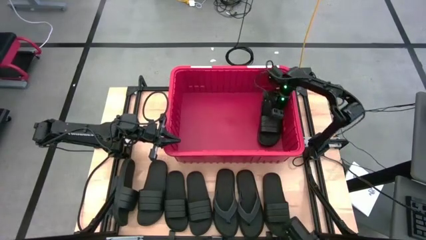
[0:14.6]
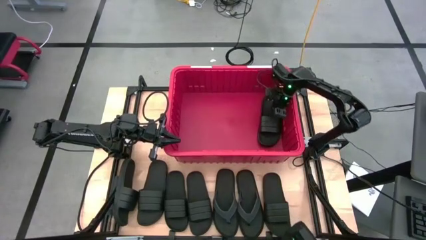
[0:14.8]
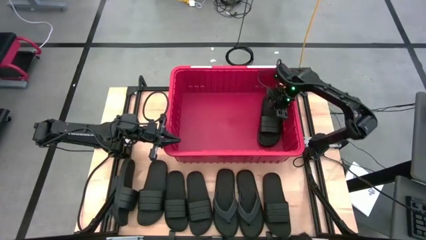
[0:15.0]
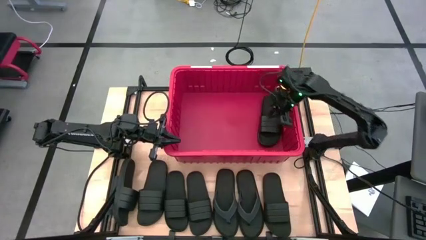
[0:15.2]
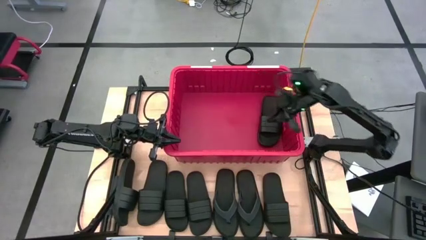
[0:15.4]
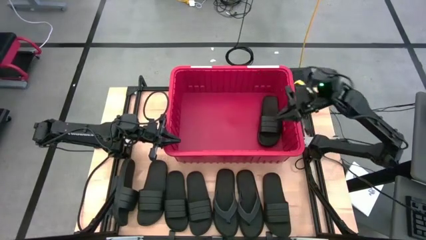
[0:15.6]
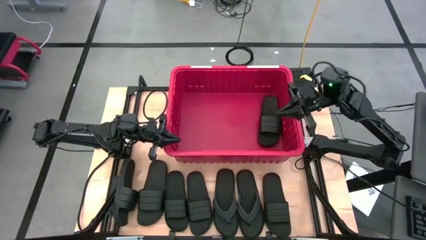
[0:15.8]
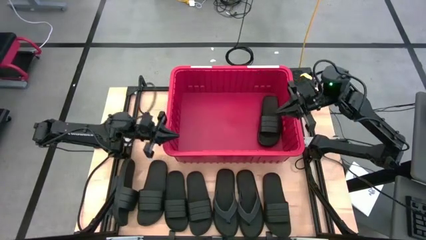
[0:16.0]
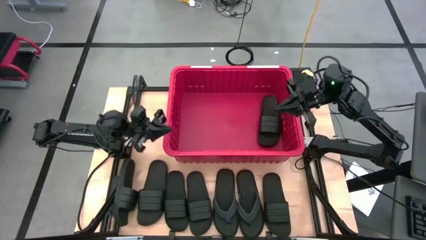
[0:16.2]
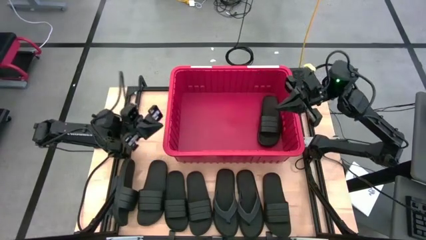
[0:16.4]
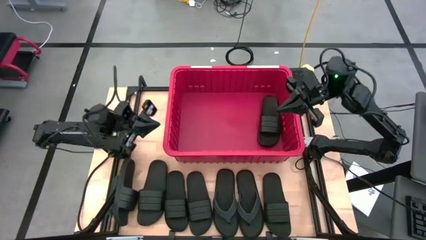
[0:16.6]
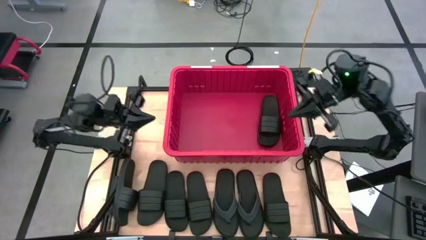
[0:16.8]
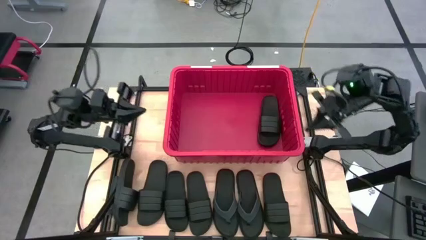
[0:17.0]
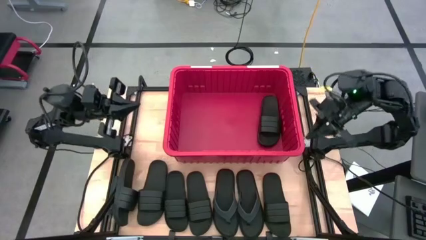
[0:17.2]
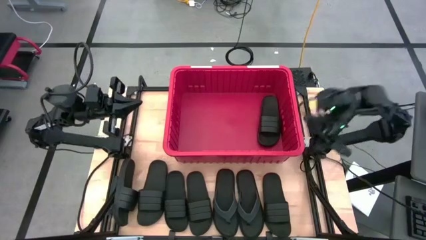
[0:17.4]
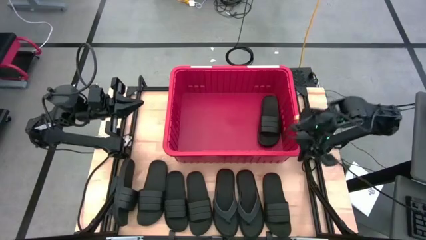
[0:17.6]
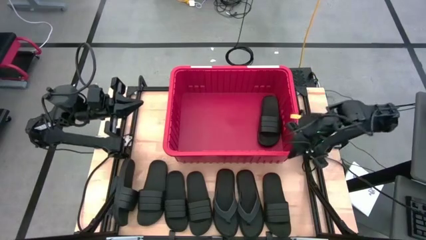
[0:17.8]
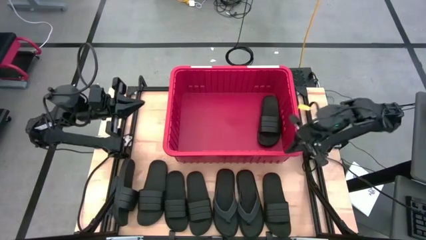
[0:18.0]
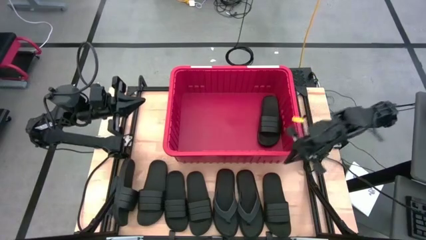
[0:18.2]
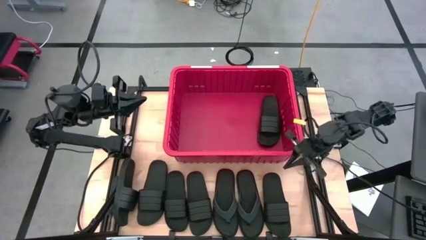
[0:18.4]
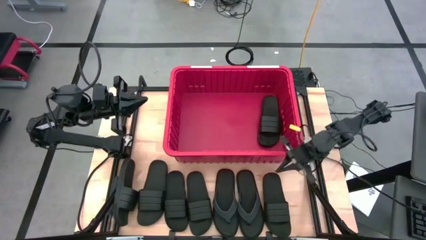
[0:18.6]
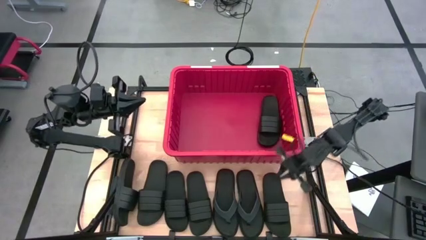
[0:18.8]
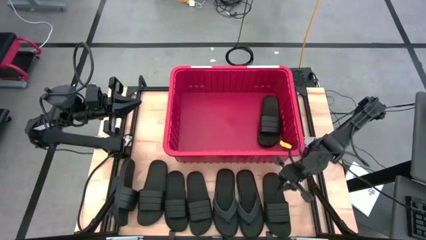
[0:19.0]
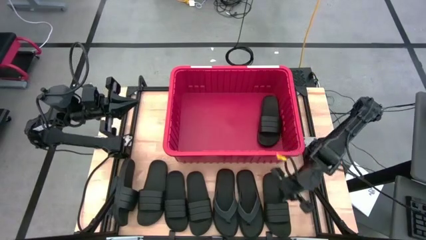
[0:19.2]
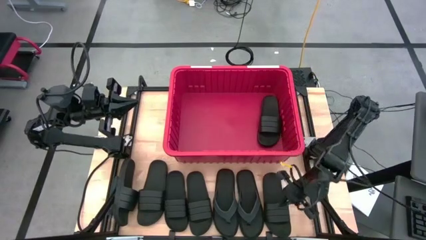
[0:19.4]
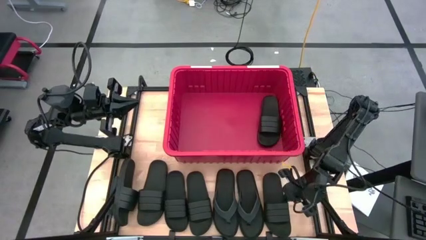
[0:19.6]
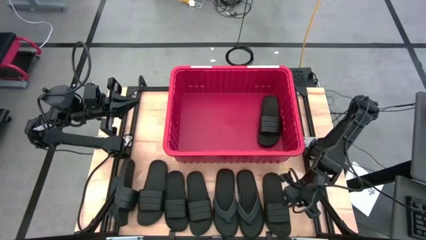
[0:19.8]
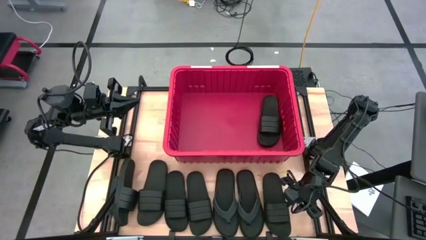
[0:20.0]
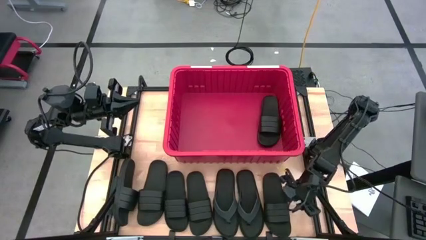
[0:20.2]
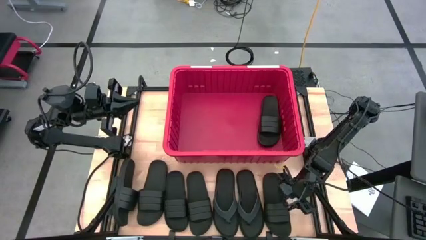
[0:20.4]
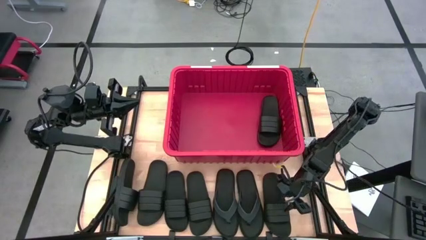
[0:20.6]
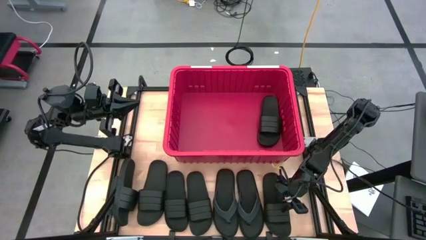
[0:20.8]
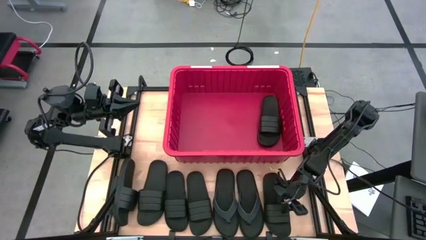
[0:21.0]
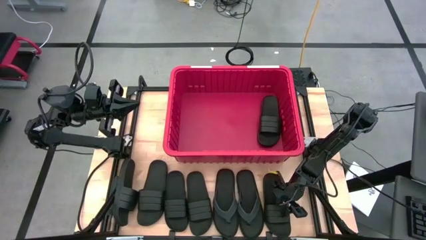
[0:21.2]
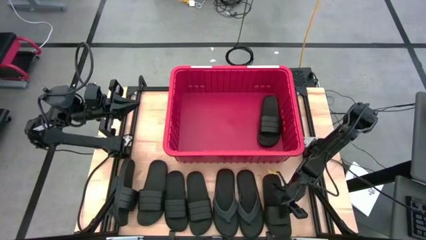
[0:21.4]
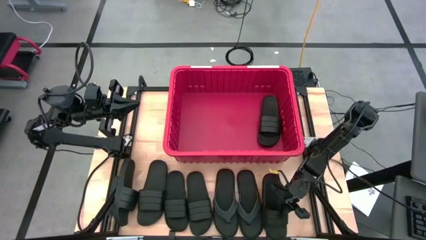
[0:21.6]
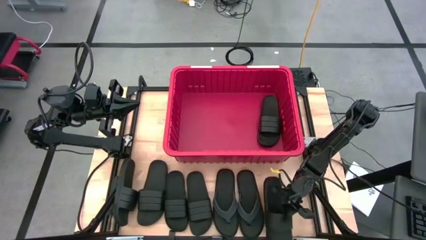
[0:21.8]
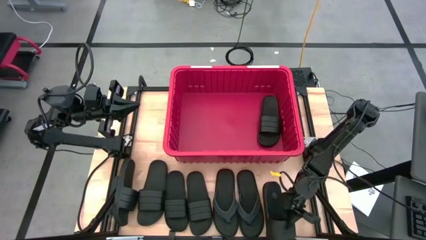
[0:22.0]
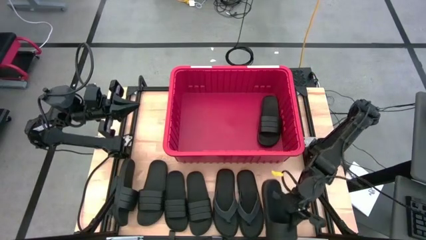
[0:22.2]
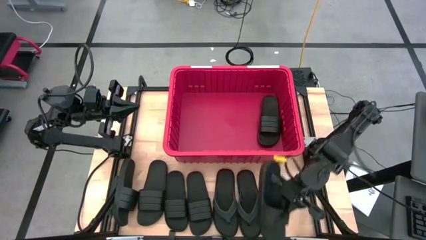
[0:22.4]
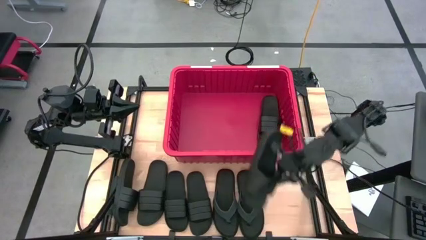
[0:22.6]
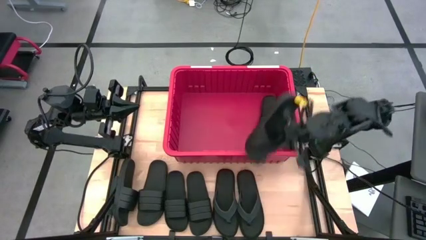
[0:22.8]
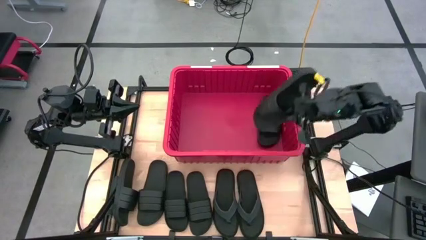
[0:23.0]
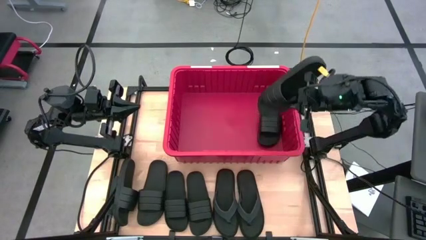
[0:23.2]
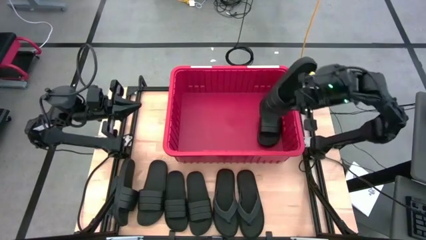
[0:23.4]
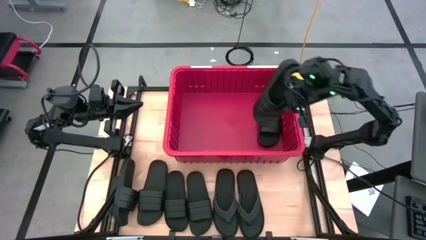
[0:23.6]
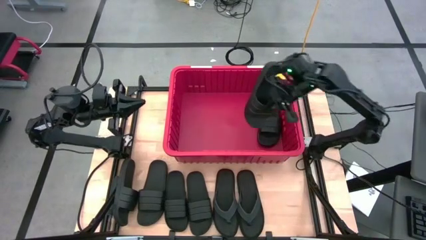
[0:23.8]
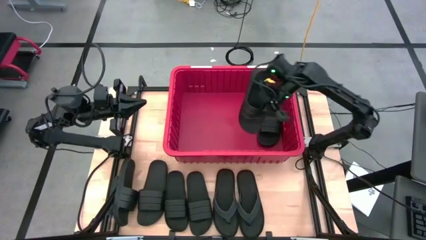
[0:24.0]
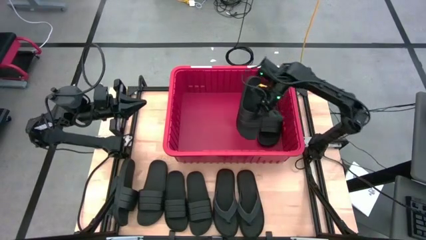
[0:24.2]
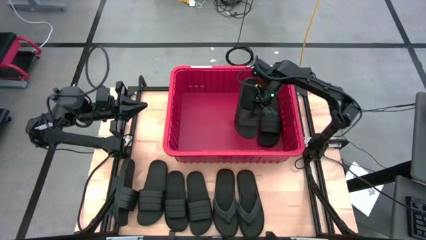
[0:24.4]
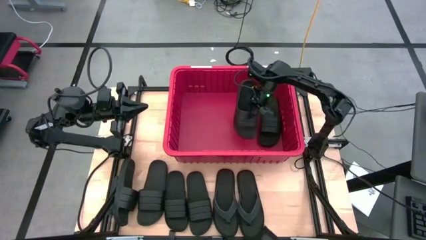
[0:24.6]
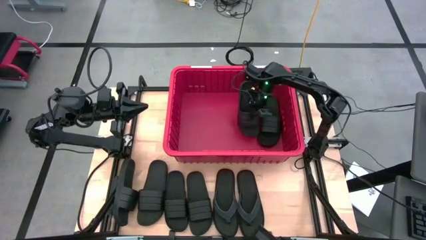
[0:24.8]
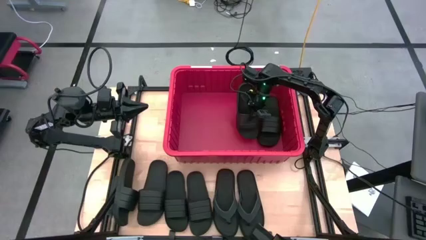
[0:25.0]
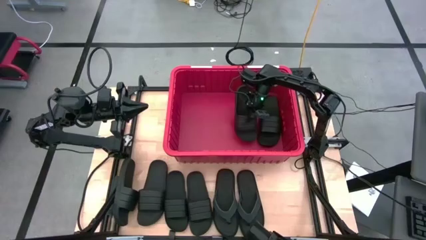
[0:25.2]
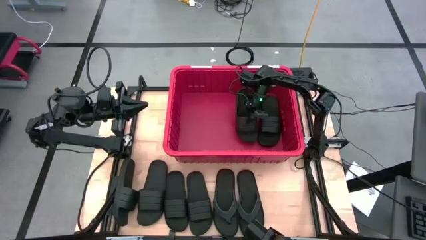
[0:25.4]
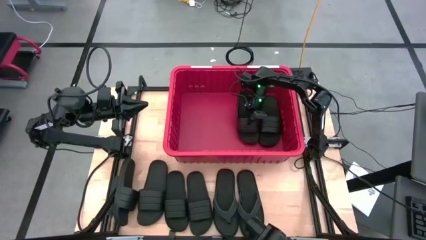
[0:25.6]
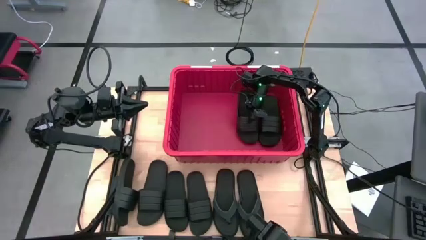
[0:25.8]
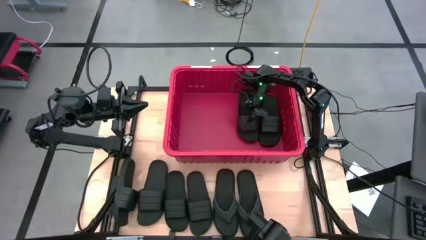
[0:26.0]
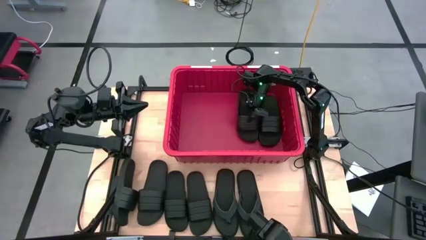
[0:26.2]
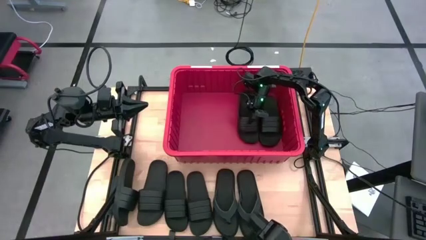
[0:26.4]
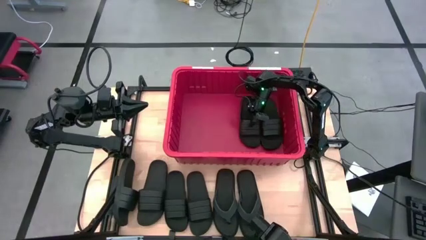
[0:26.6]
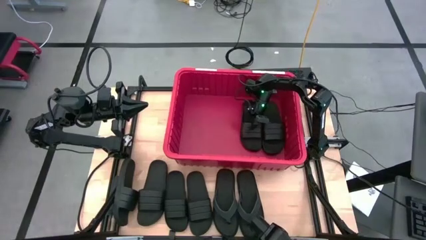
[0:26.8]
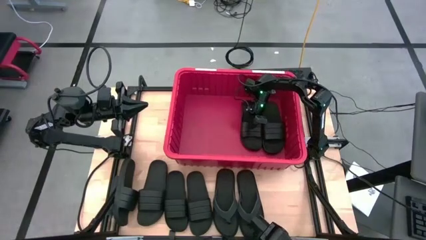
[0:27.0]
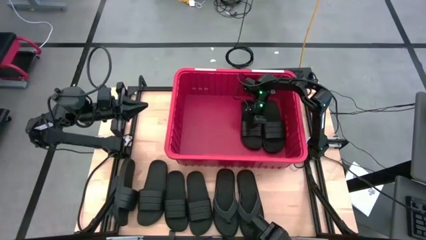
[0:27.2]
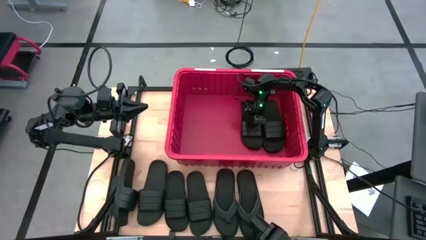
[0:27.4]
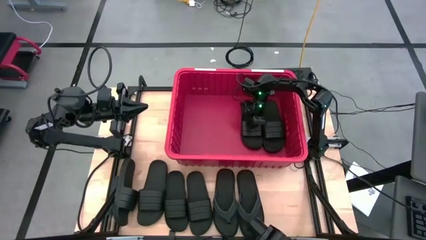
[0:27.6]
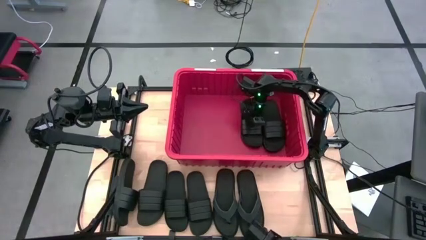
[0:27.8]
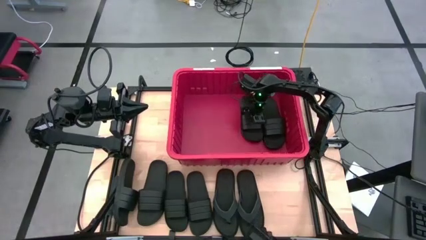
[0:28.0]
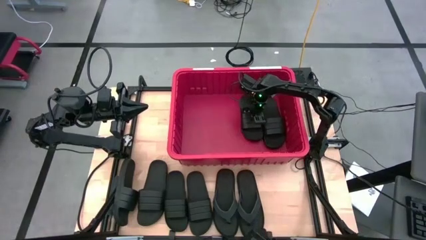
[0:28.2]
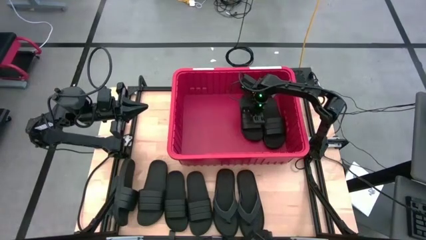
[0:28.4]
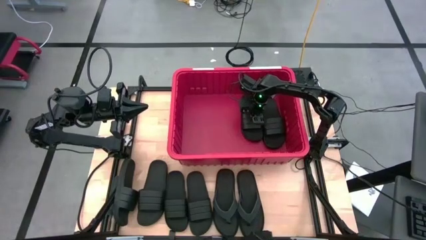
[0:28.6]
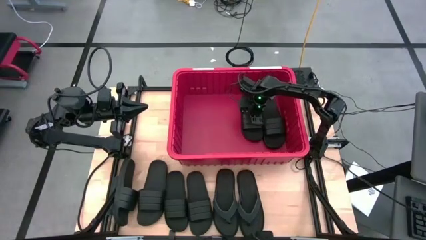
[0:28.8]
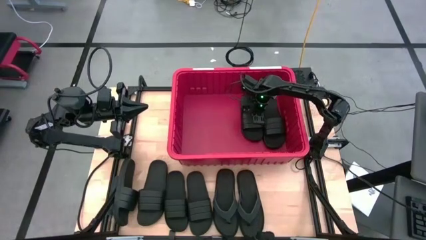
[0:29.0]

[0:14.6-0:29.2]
Task: Pick and place slides into bin
Put the black slide into the red bin

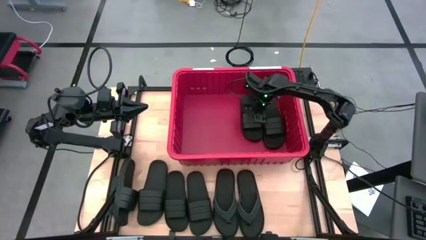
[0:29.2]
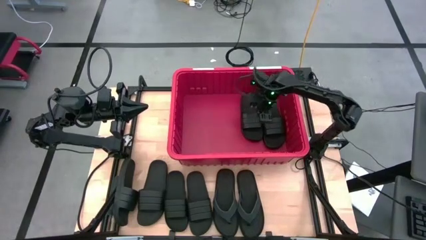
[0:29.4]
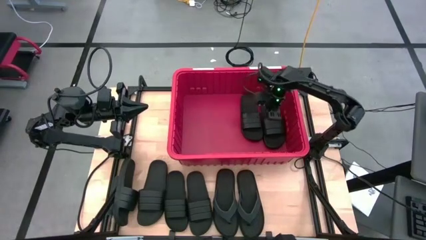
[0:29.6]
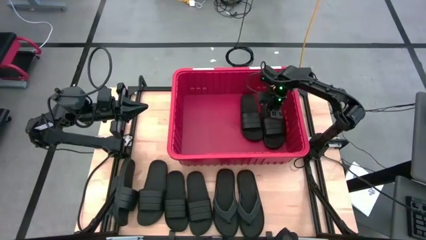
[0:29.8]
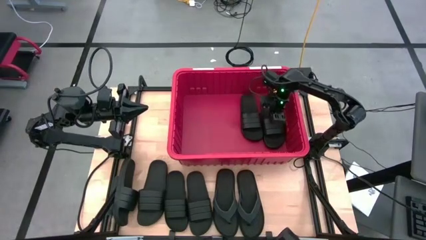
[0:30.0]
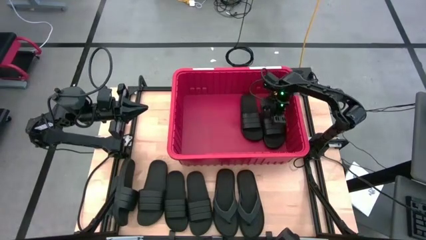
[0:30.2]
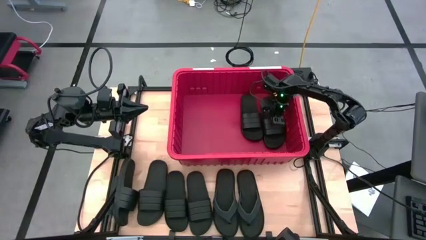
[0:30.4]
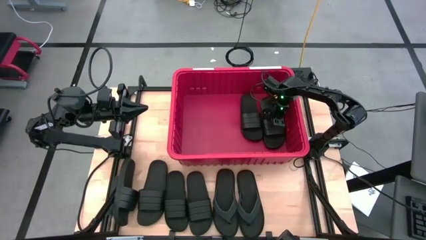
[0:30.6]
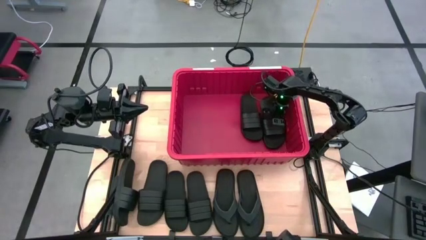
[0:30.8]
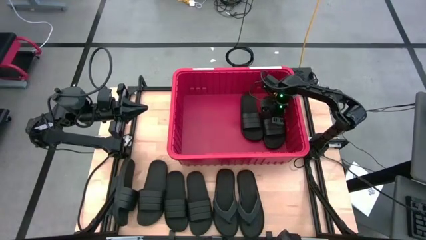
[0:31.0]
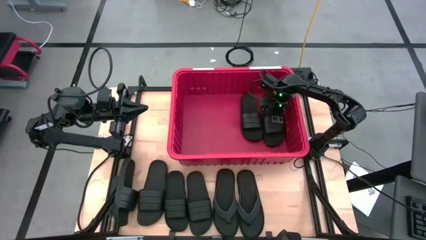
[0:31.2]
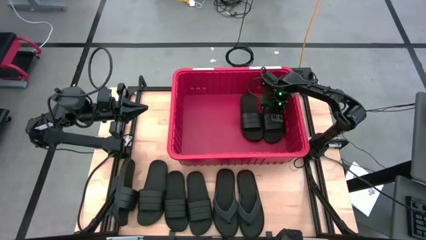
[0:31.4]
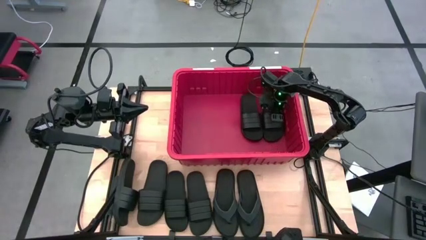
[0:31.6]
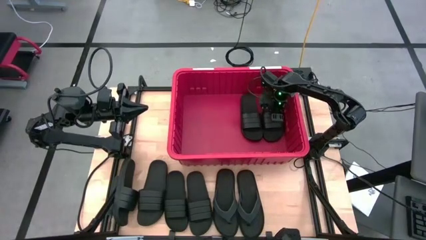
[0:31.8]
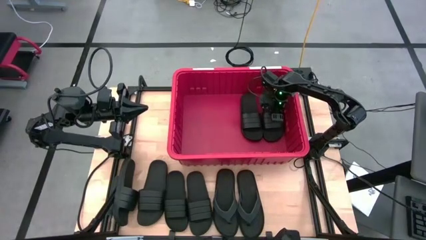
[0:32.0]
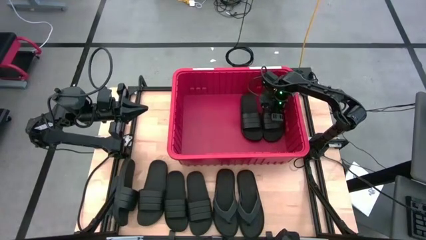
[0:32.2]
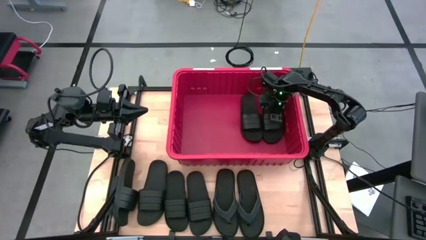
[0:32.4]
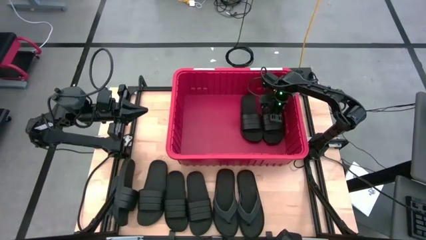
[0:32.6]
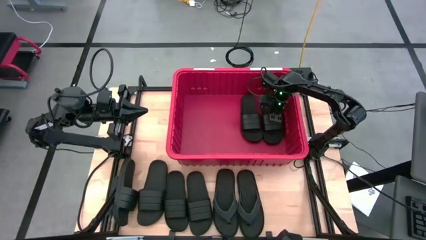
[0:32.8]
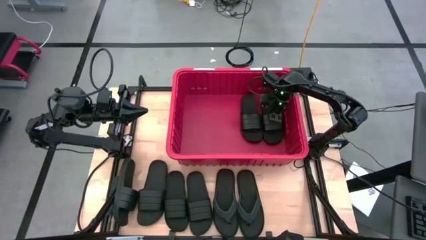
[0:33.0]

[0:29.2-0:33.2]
Adjust the black slide in the red bin
